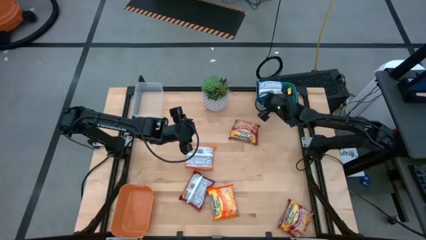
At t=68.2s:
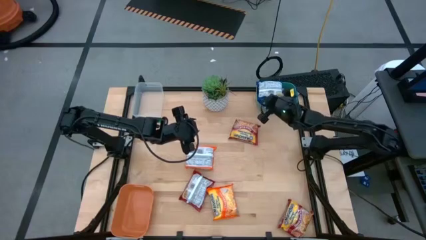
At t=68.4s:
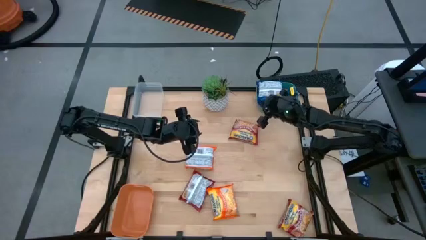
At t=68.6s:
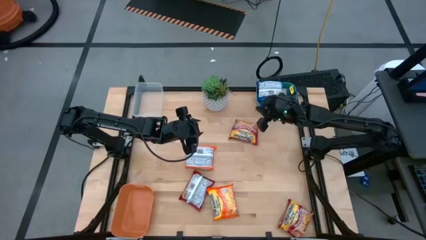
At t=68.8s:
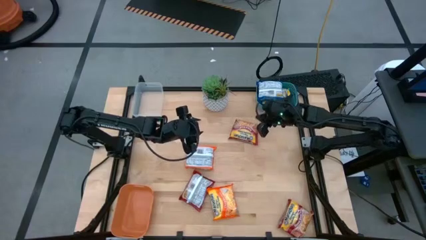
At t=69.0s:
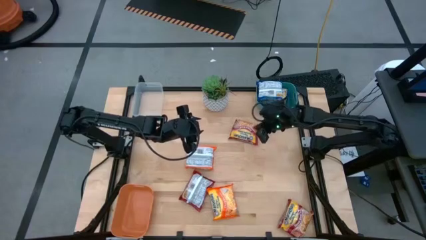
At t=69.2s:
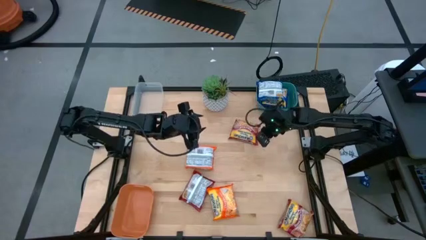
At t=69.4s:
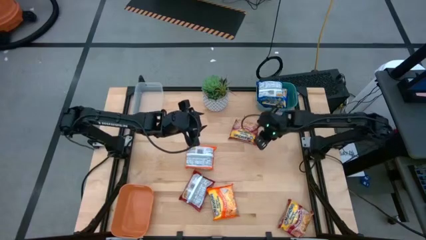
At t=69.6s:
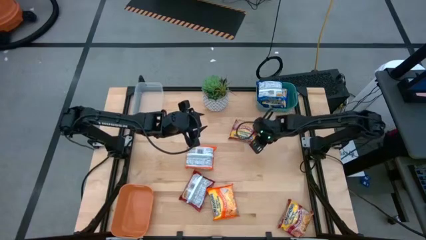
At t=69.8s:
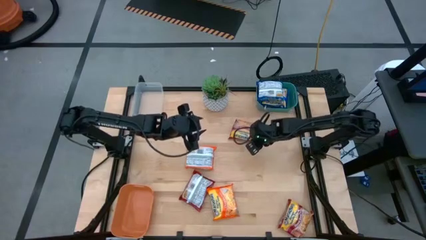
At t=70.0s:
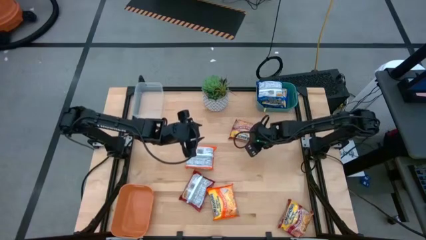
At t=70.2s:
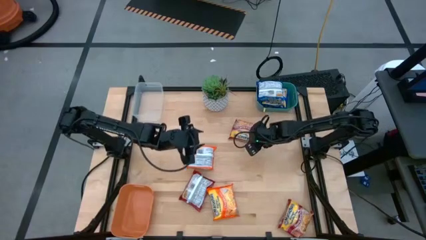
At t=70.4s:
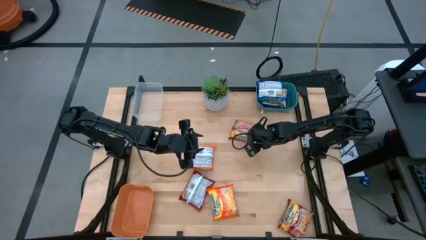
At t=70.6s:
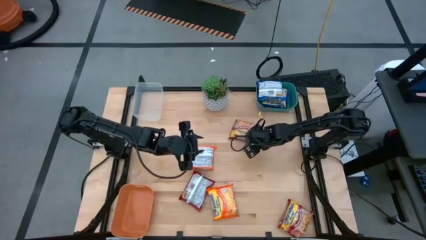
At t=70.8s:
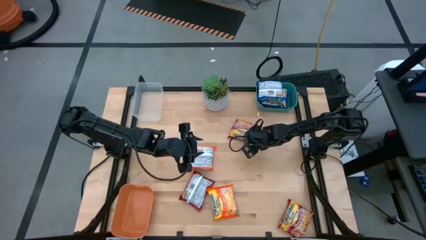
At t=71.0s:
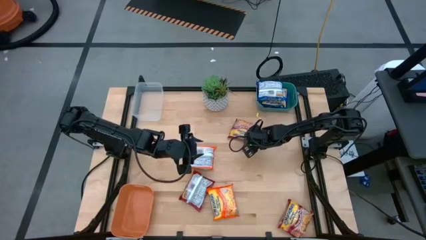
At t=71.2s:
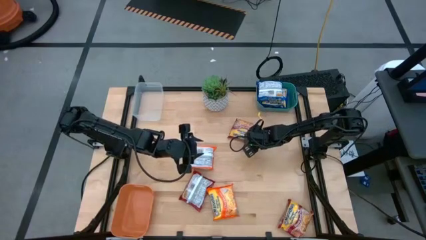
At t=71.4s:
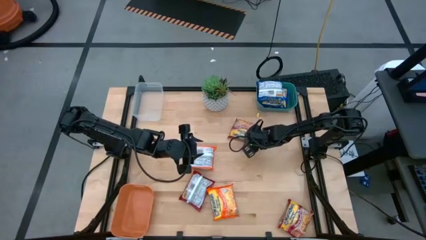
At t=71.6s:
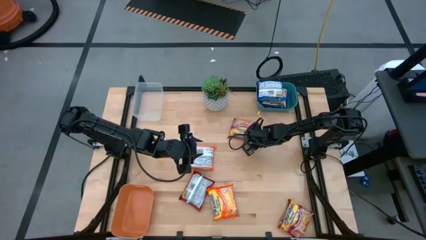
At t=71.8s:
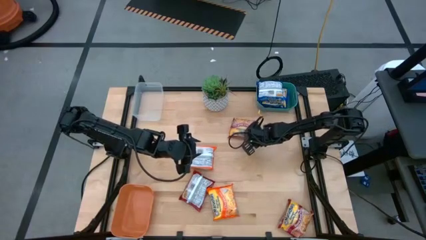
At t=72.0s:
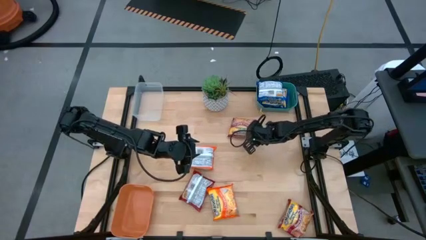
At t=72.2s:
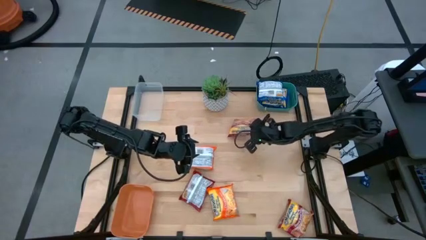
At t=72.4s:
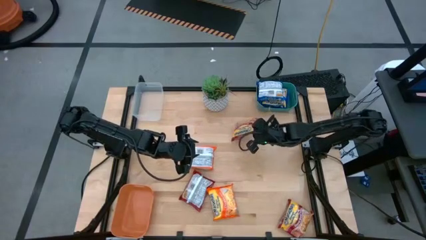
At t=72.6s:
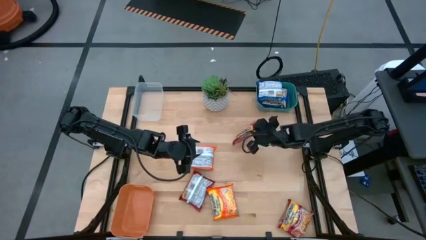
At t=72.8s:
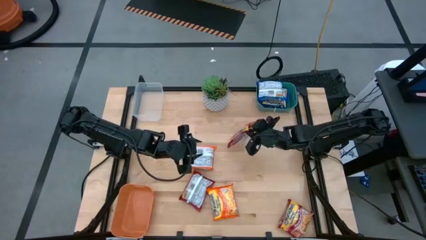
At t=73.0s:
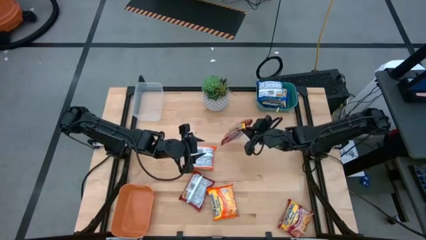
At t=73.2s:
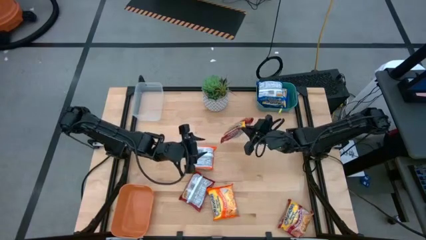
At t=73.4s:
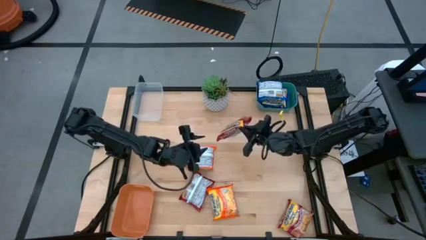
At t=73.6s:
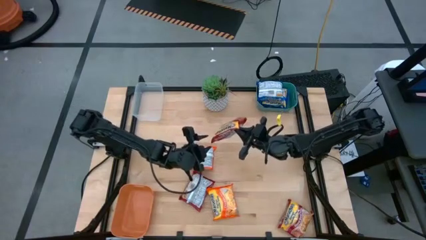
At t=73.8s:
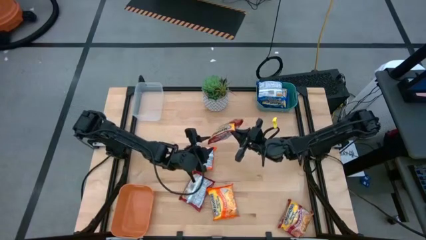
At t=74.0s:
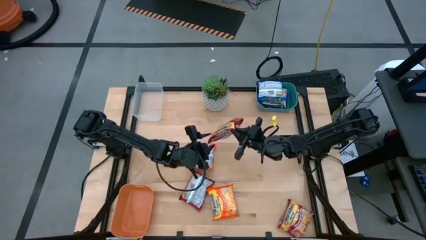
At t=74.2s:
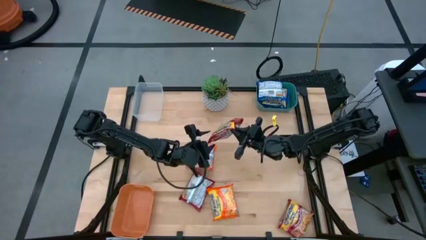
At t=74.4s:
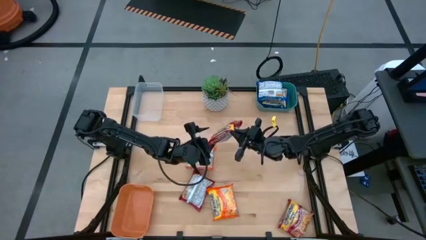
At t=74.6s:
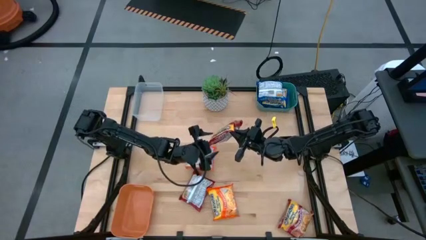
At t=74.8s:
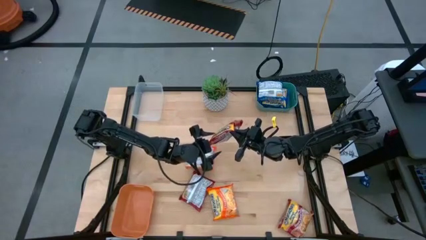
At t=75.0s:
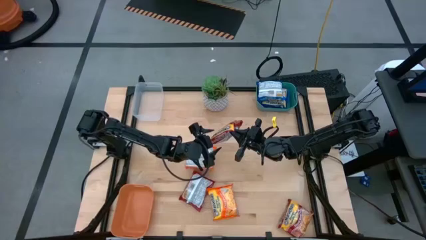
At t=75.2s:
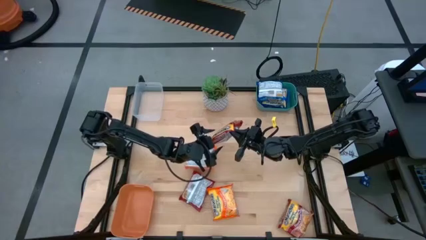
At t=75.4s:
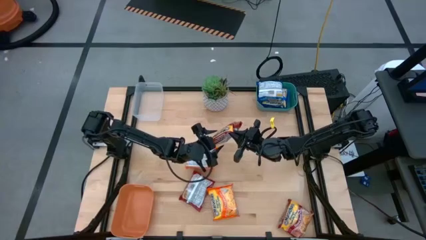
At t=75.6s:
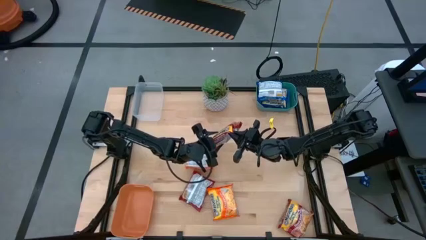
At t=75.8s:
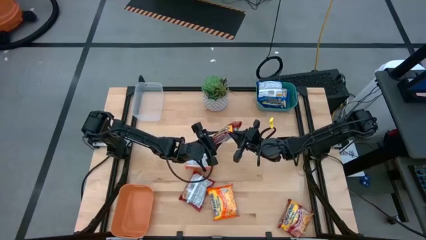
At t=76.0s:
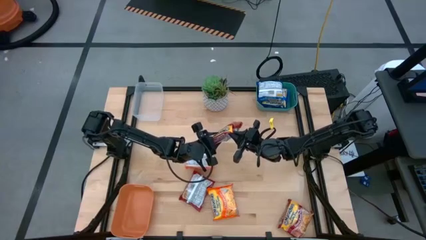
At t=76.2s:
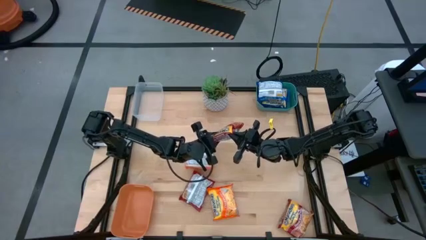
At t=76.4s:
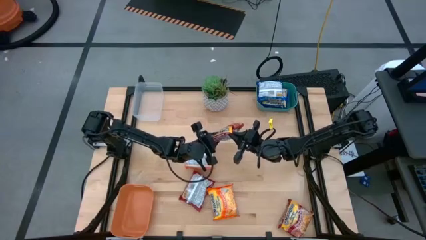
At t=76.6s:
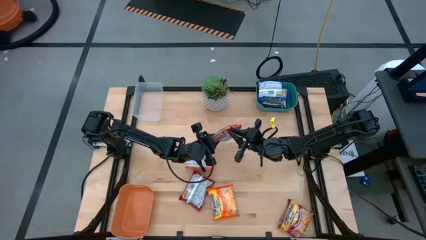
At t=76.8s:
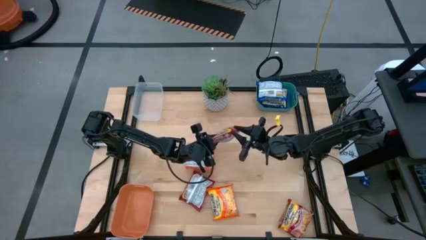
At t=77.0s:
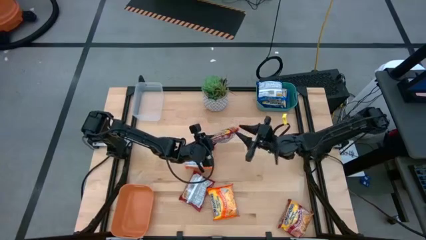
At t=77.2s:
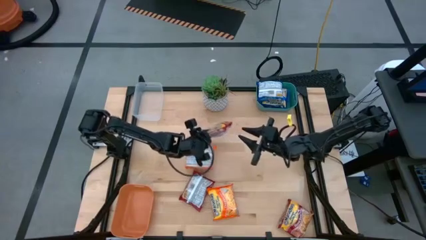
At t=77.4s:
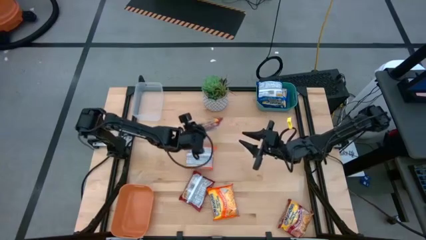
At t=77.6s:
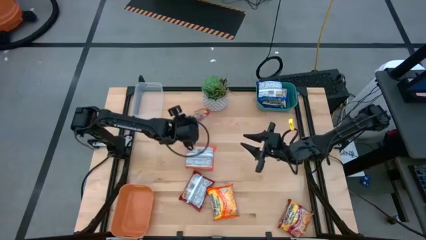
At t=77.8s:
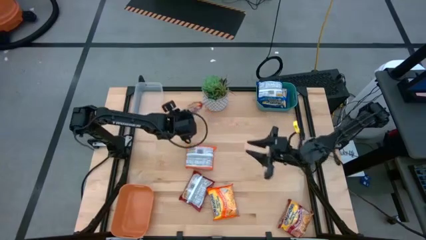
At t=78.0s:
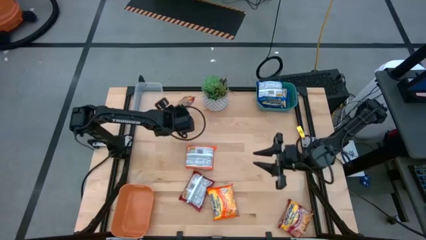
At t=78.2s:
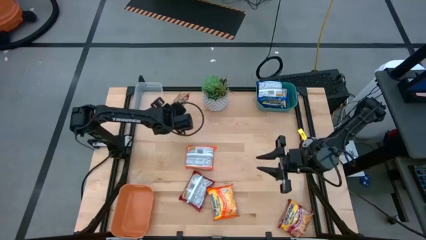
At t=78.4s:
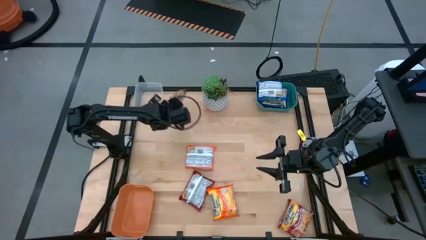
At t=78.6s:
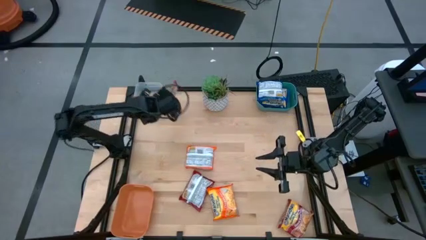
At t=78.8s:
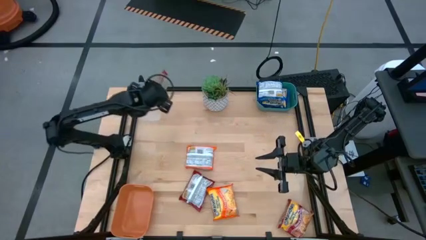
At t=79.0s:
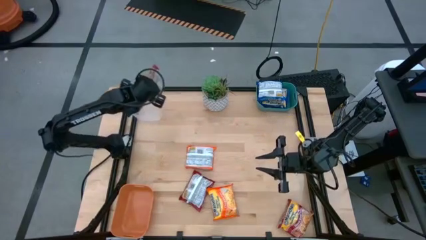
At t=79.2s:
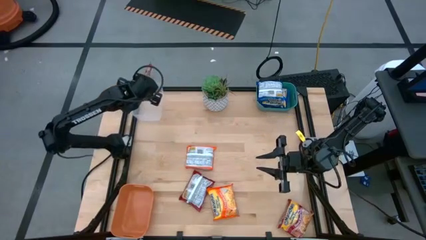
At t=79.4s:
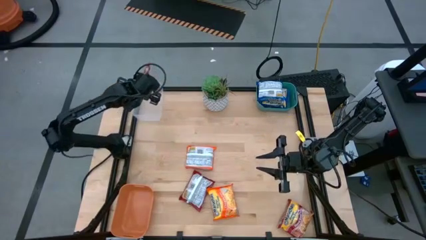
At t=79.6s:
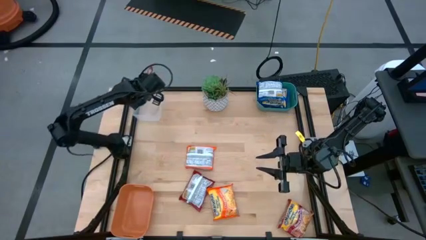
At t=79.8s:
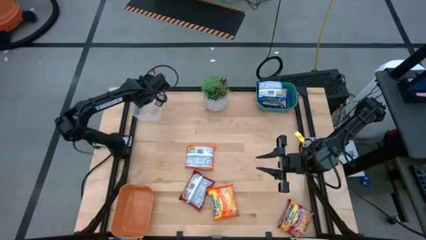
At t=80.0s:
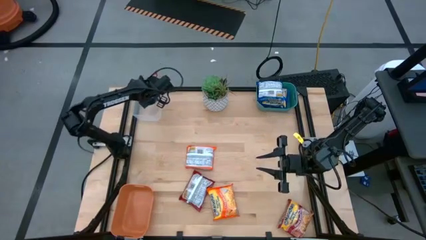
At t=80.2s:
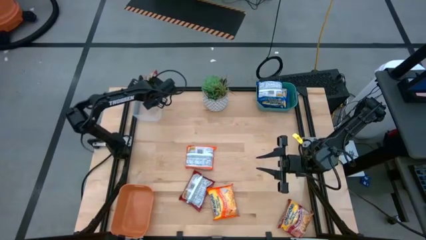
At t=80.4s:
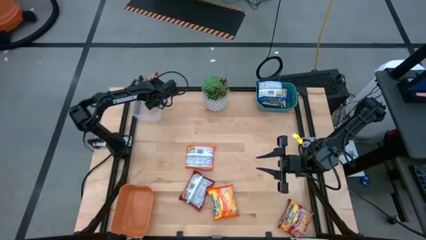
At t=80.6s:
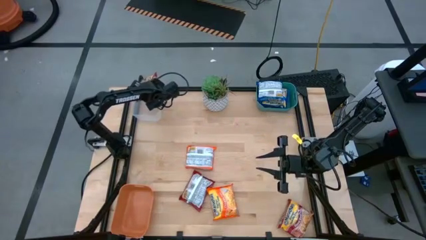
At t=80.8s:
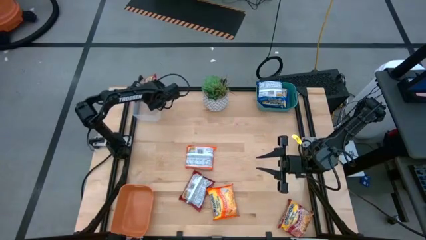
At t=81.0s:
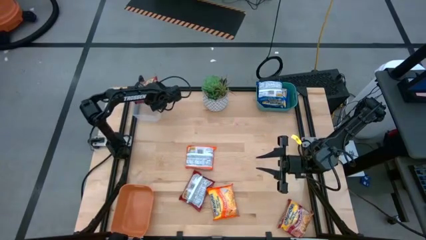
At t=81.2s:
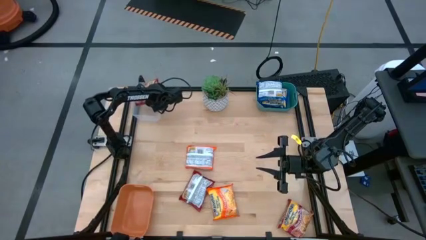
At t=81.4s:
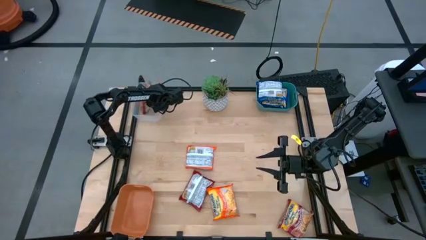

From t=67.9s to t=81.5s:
Task: Sort Maruchan noodles
Put the top red noodle pack into the transparent bin

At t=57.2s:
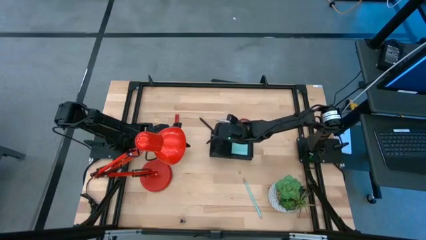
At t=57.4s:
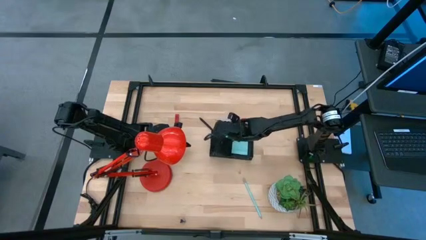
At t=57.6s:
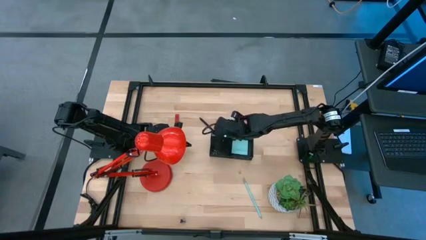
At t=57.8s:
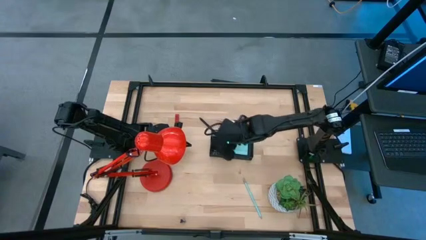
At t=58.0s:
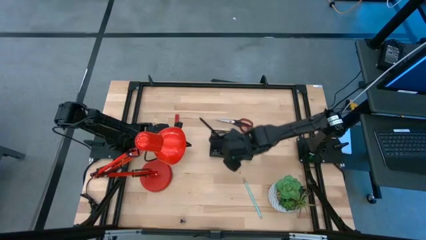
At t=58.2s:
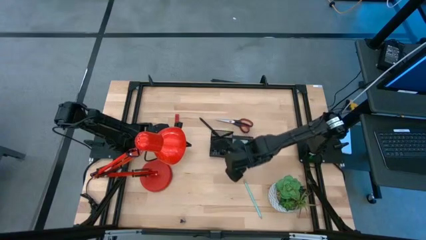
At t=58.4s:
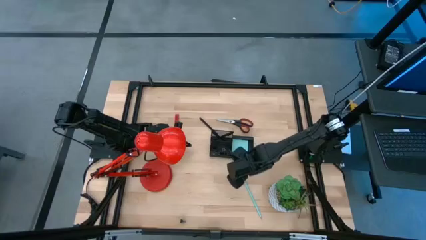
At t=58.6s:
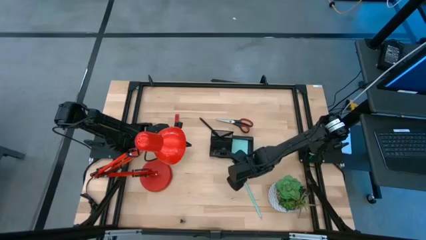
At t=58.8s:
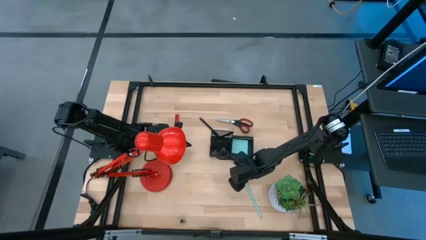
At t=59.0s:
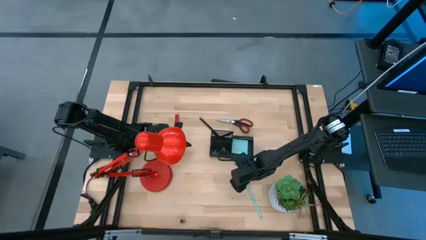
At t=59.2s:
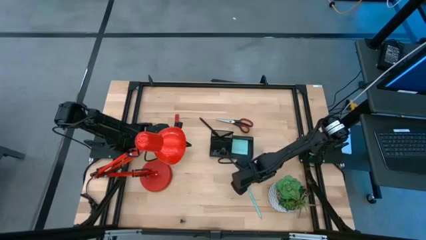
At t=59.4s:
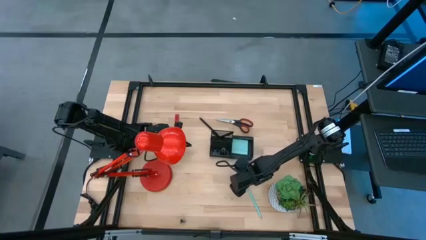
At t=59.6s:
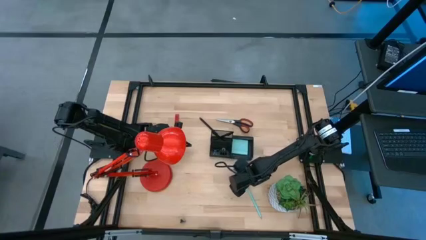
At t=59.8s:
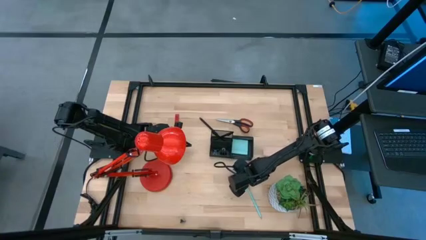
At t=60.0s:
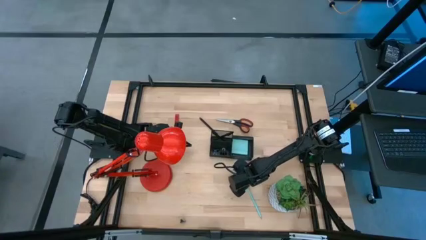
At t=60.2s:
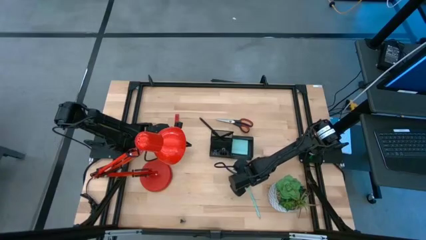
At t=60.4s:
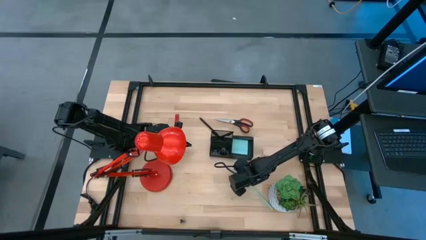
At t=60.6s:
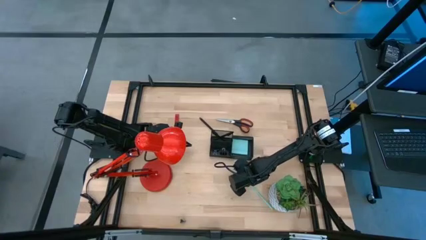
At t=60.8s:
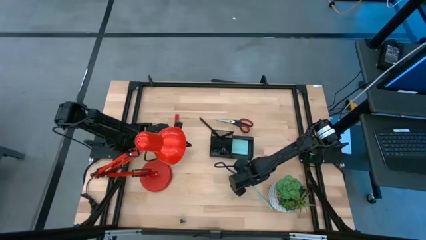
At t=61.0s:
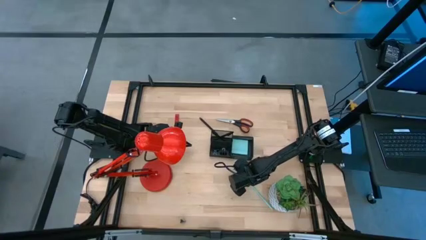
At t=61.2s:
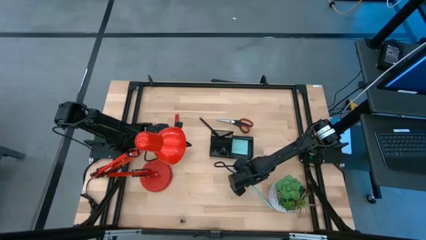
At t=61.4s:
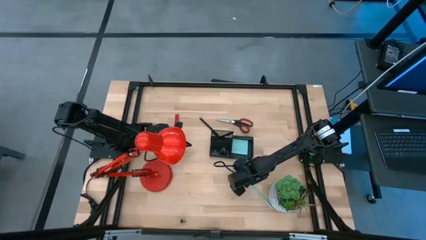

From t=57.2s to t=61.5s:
Task: Pick and place office supplies into organizer
Put the light blue pencil into the black desk organizer
